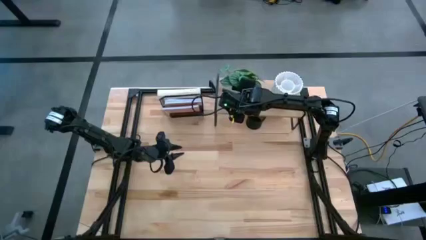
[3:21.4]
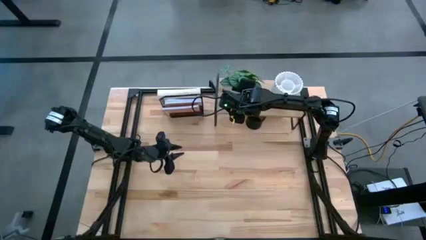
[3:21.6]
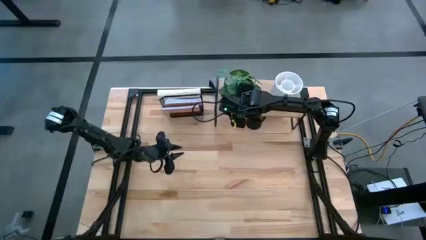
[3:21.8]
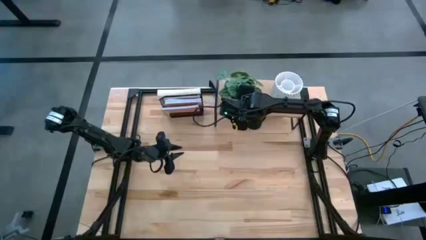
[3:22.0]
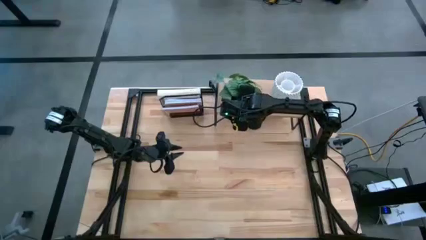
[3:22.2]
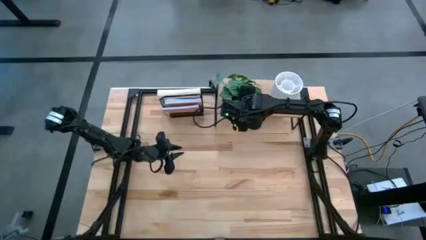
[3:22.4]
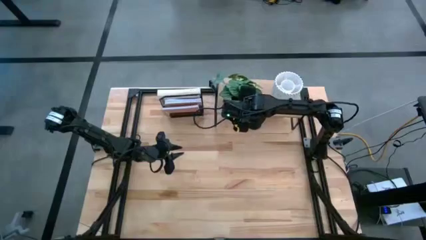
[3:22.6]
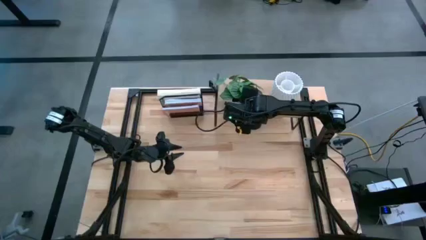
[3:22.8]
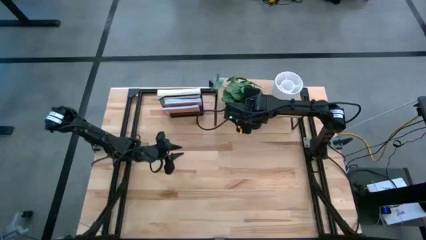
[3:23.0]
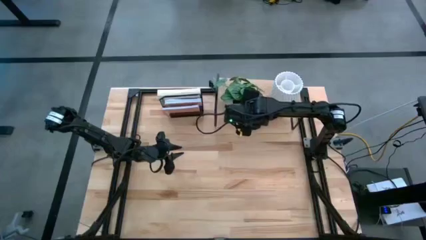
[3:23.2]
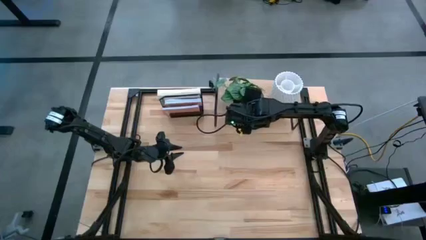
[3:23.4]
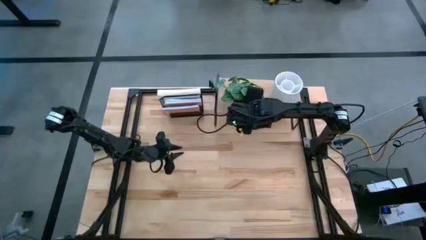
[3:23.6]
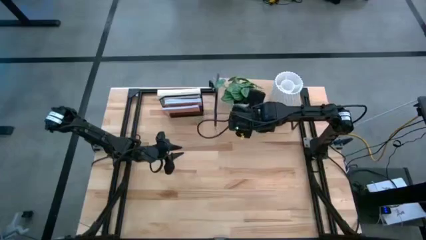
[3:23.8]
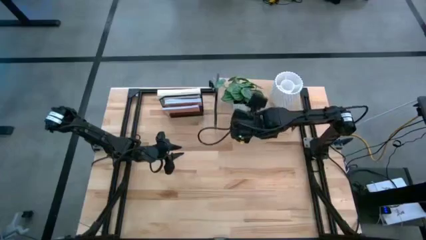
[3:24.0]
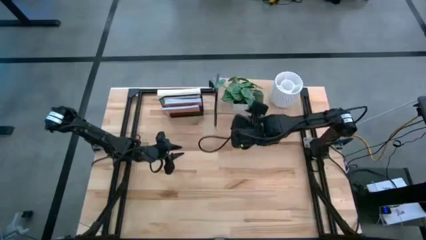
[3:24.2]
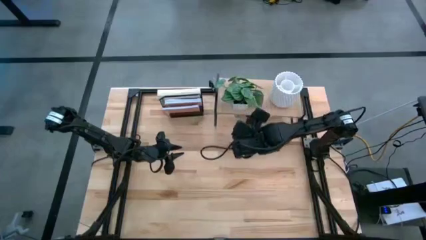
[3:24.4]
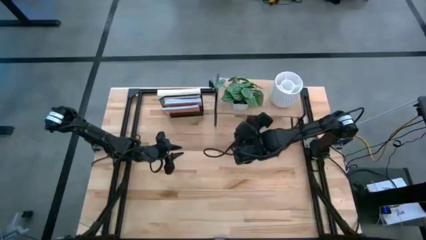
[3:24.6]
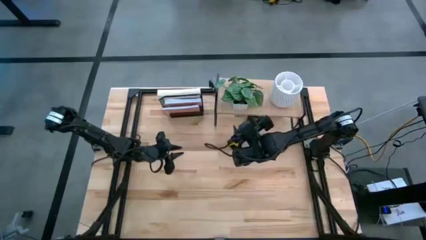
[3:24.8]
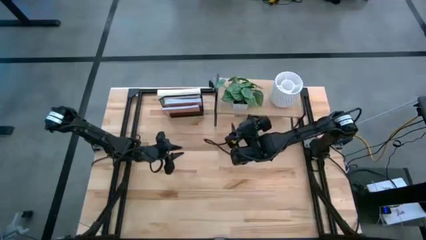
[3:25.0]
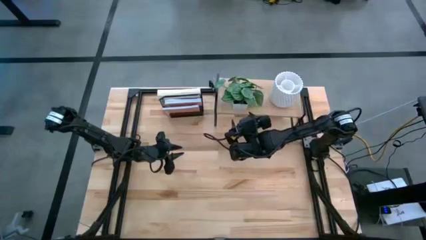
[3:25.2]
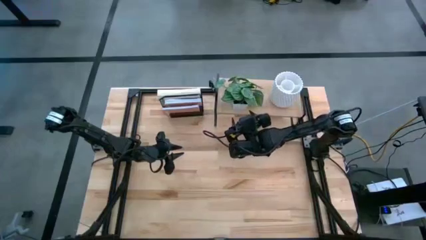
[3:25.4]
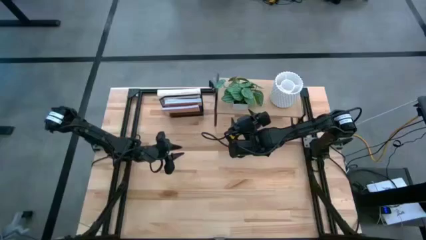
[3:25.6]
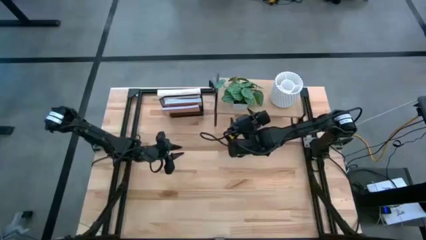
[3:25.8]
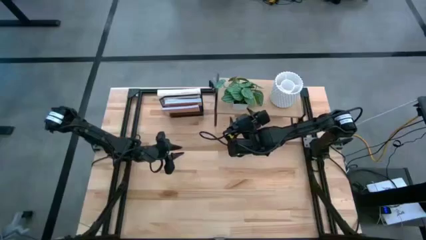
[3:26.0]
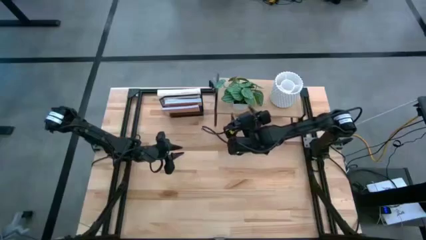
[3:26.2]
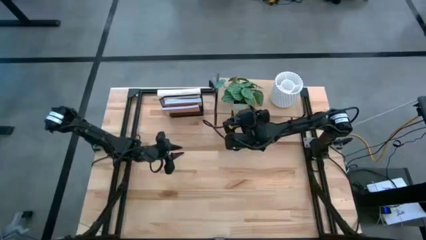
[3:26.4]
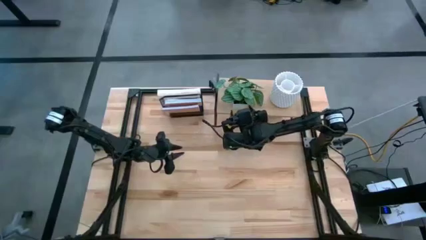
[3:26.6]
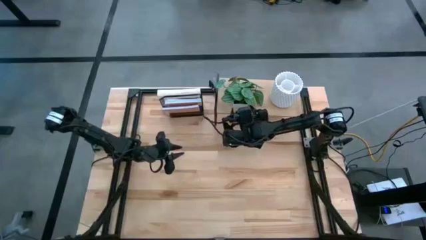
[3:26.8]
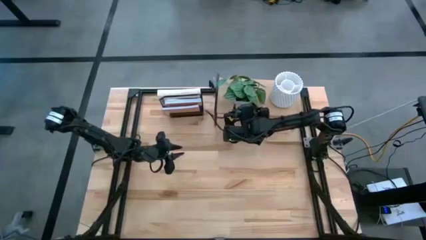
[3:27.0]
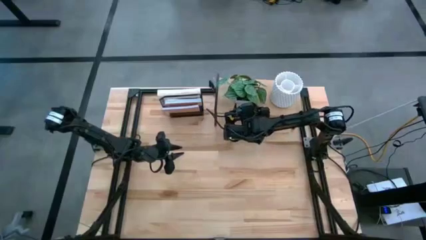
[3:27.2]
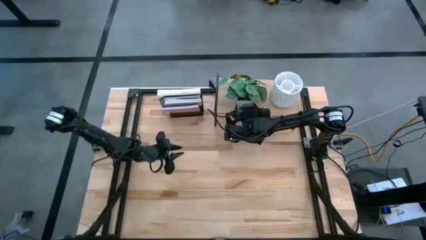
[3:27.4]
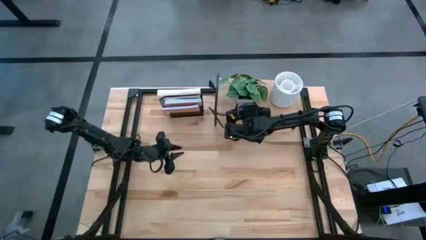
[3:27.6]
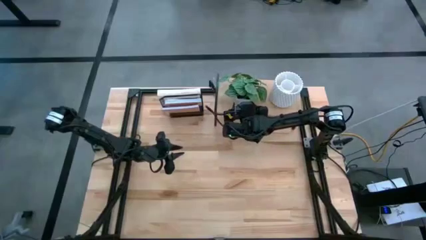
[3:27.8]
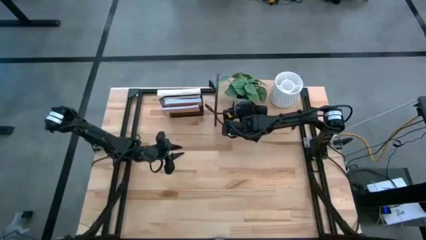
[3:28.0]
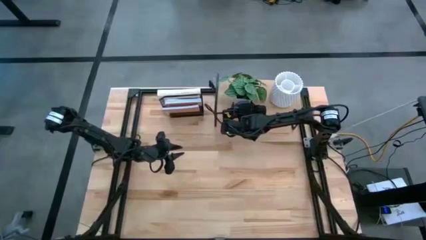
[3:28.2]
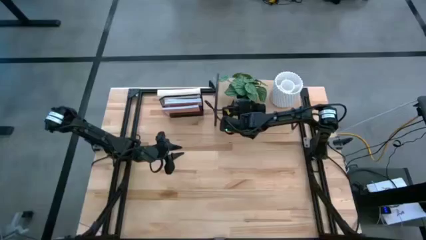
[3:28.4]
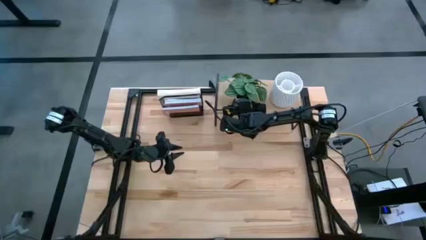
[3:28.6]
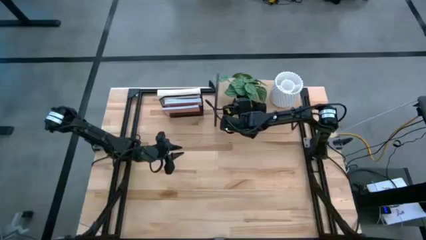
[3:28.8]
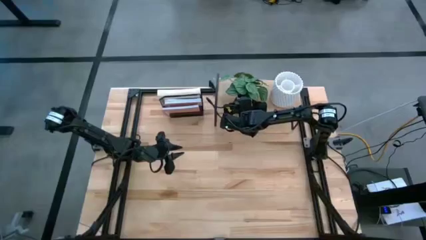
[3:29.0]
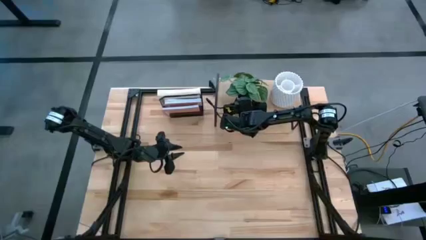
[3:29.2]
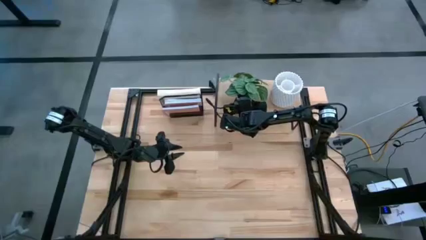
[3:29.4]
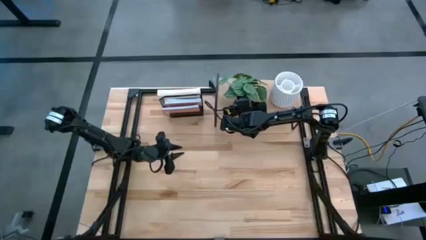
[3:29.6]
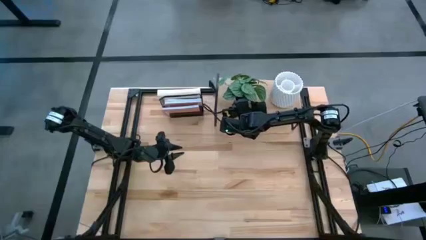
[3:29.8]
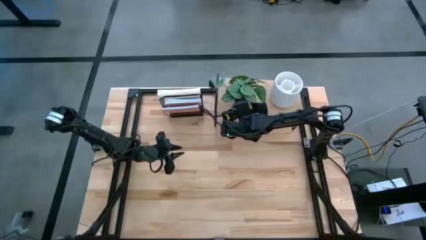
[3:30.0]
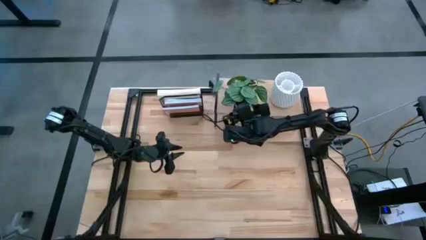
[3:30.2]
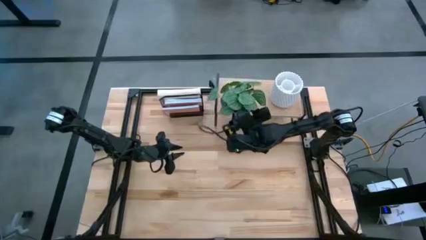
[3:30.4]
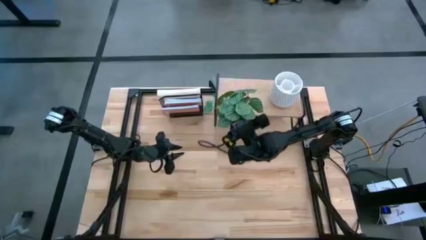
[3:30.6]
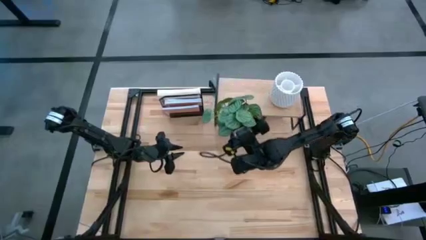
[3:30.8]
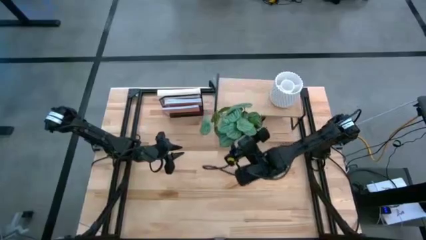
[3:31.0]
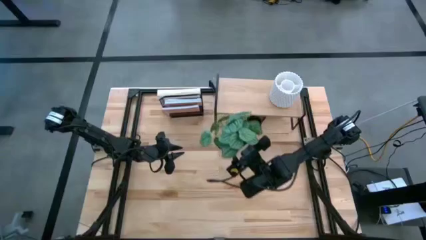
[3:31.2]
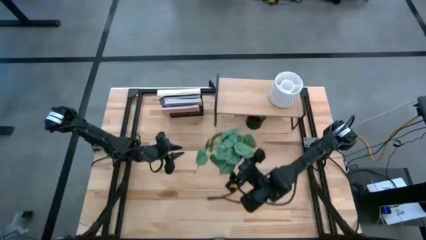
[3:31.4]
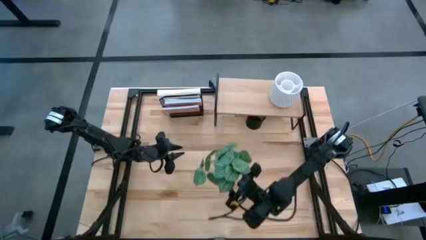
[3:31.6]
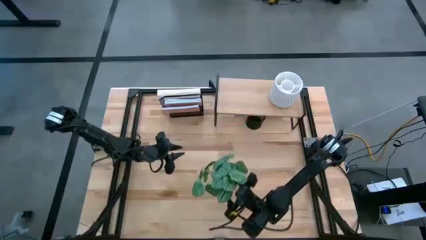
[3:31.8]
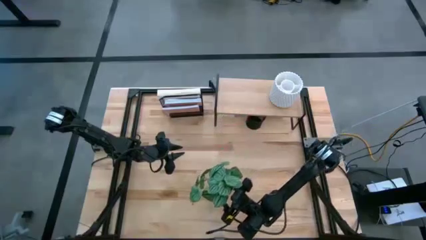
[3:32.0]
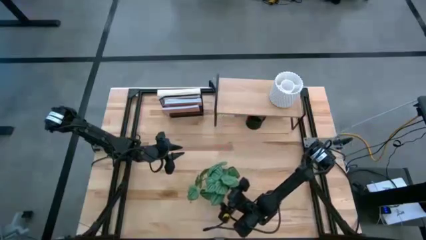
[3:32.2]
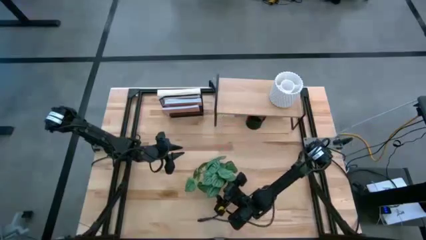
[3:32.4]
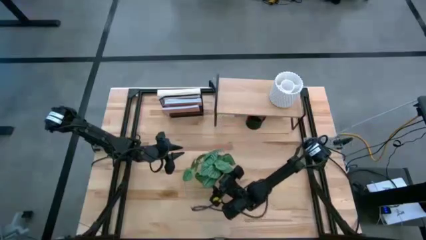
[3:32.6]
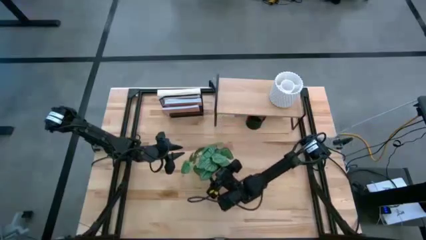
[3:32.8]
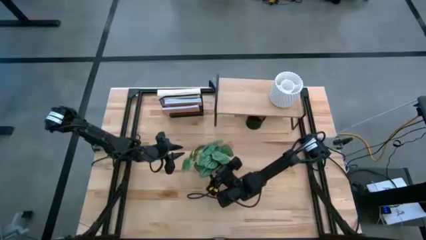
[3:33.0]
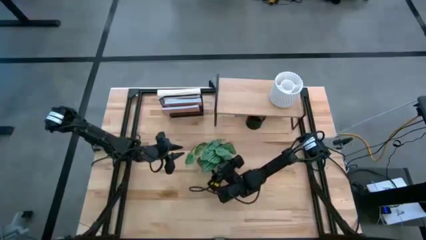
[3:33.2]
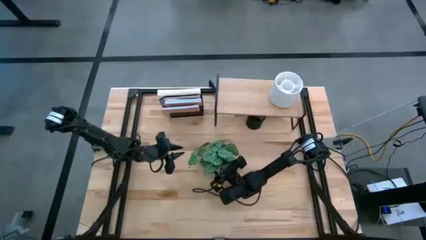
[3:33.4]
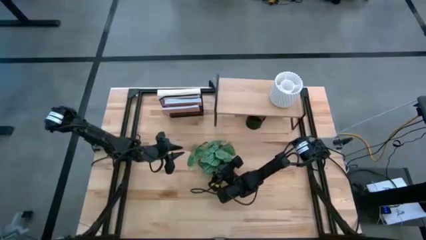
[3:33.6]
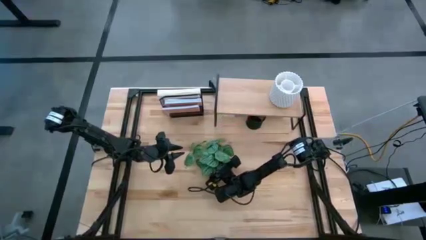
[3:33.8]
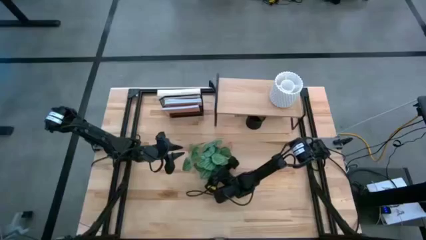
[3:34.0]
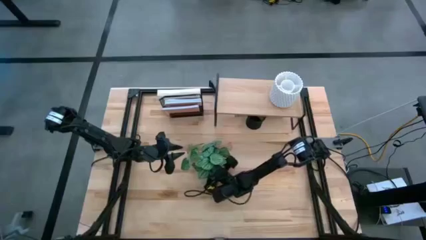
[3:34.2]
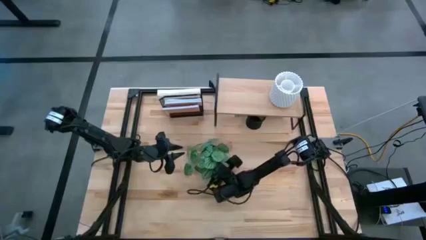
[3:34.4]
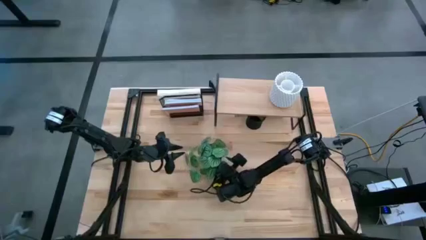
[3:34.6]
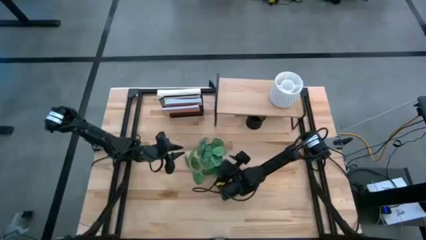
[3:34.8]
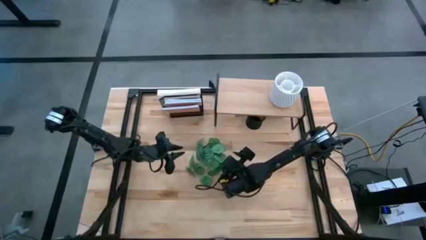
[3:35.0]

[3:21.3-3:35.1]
Task: Stock shelves
Remove the white potted plant from the shelf
